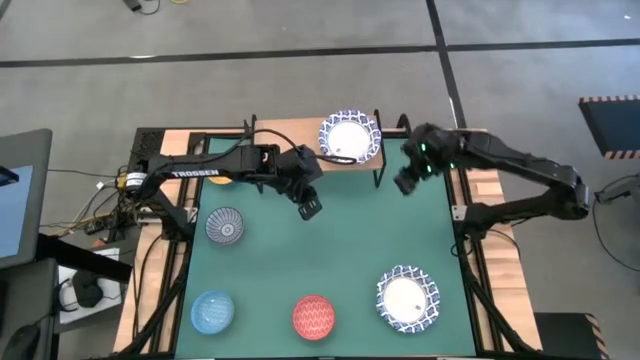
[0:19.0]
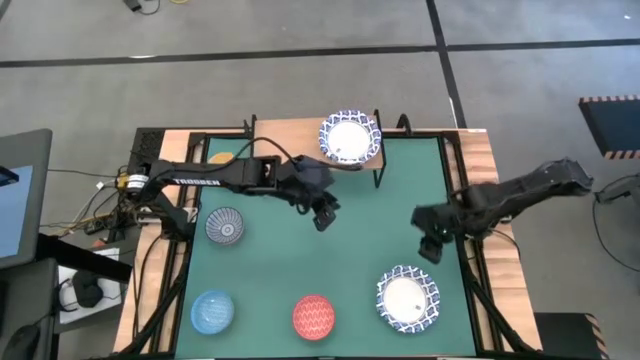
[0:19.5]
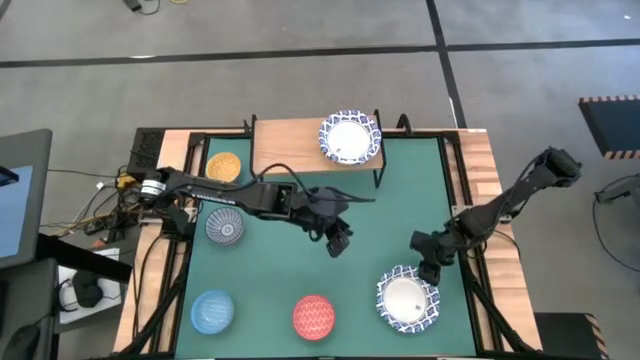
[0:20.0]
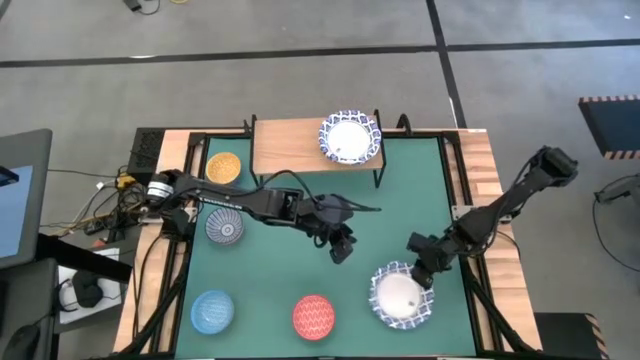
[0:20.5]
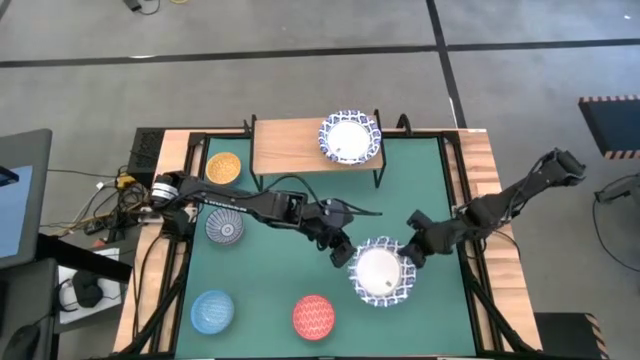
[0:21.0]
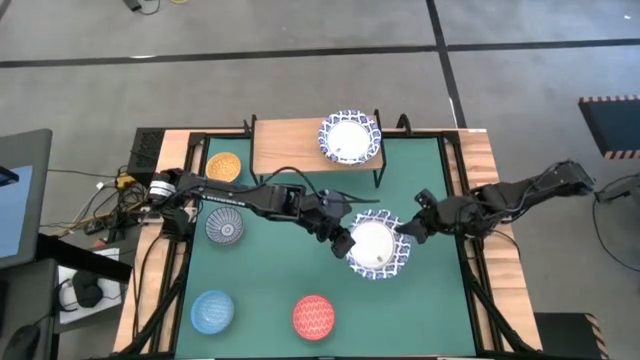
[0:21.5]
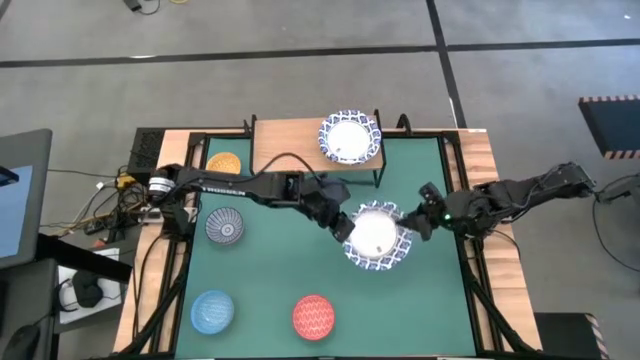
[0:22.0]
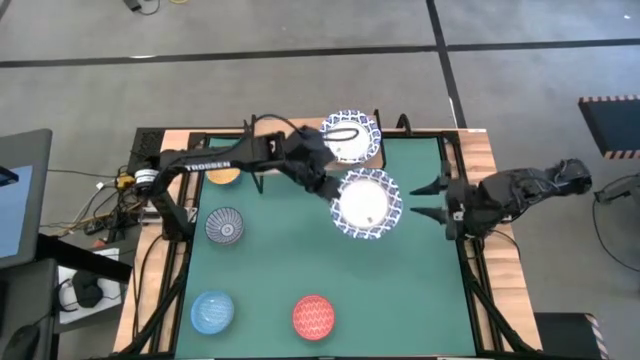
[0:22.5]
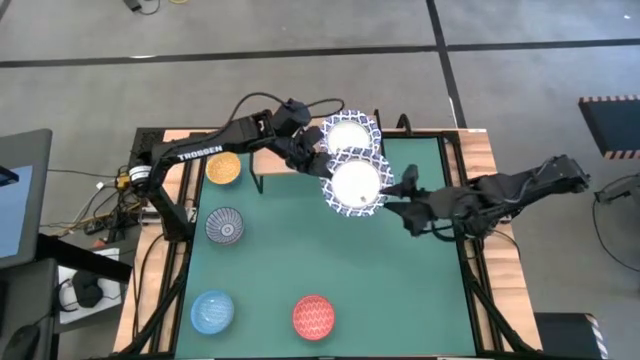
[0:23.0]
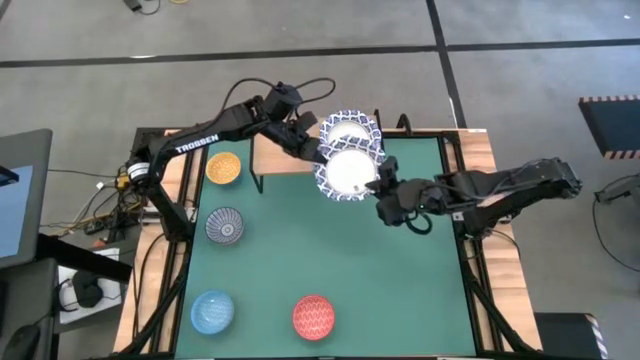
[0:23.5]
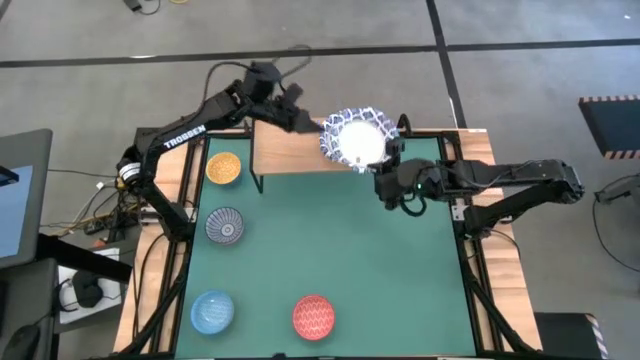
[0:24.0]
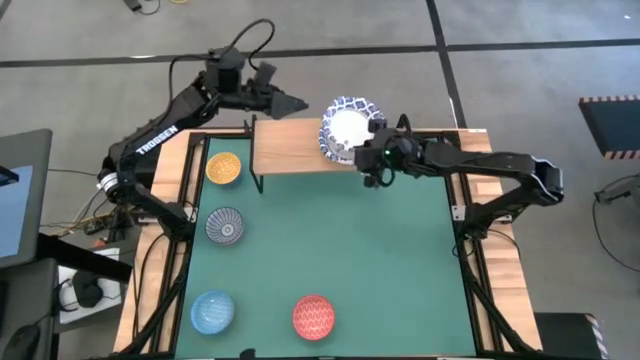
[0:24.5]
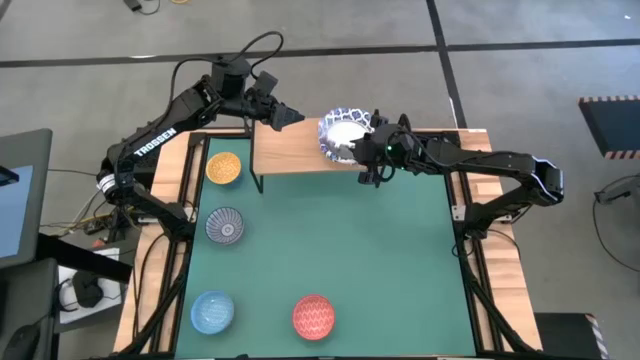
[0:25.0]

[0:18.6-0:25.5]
Task: Place and stack bowls onto a shelf
Stack the white bowl on top of the other white bowl on the shelf

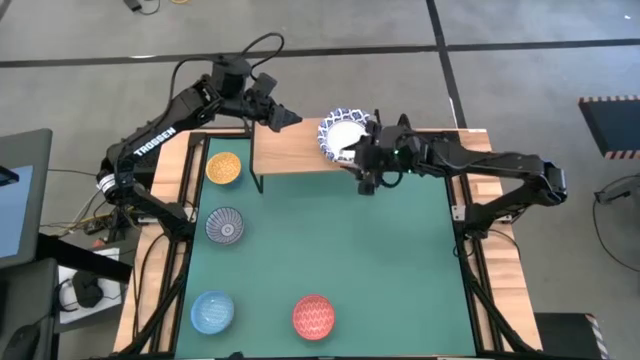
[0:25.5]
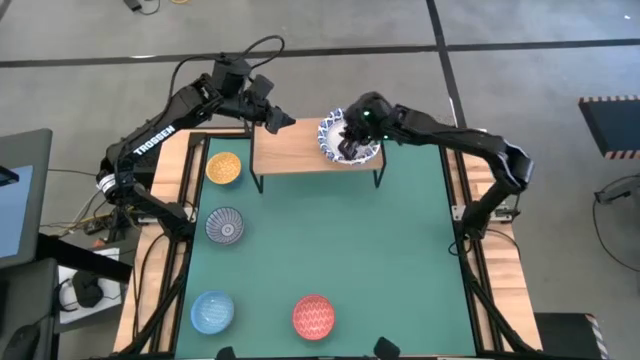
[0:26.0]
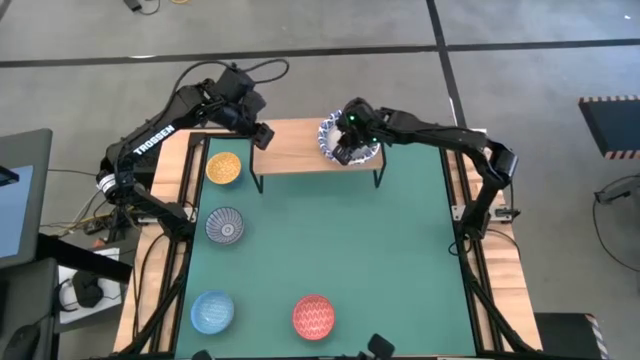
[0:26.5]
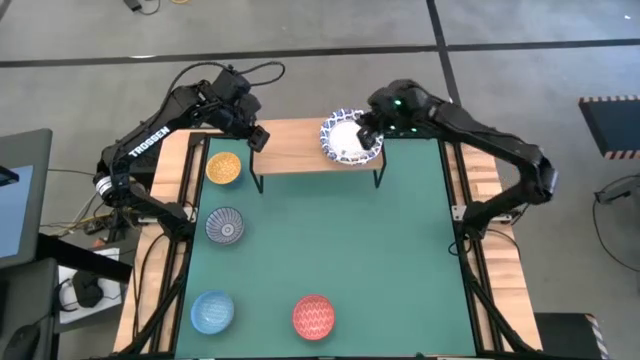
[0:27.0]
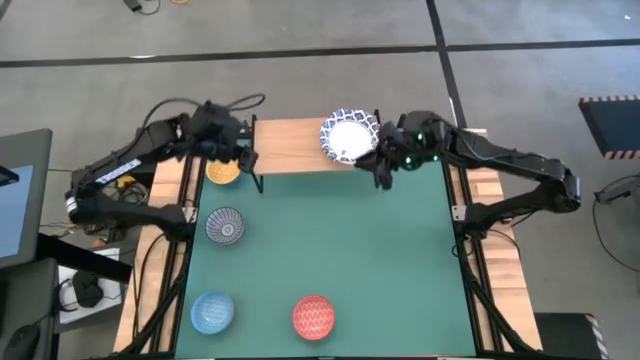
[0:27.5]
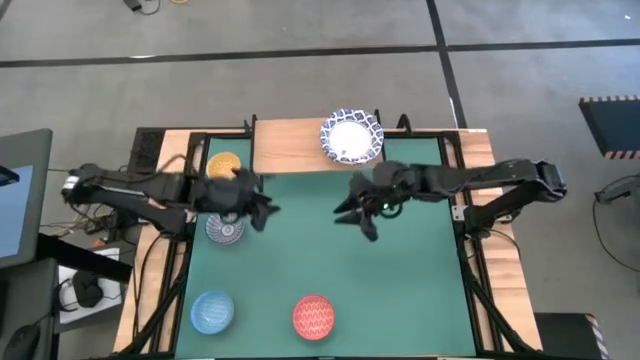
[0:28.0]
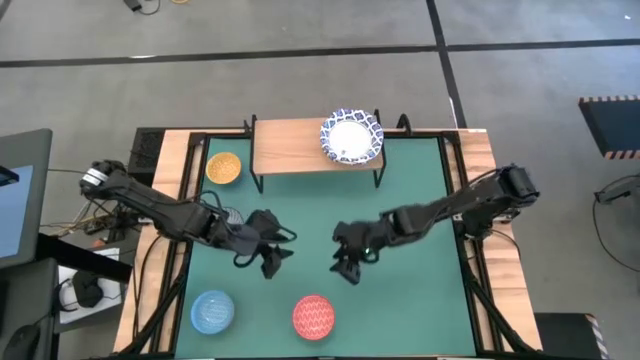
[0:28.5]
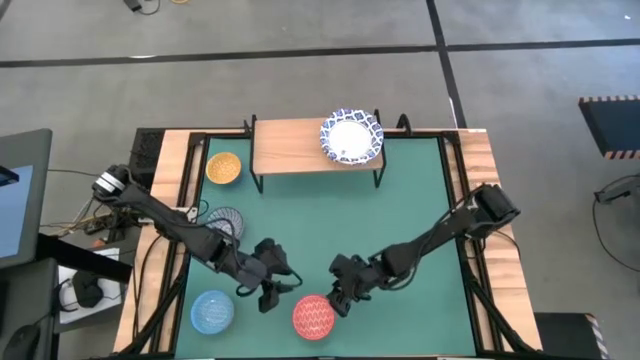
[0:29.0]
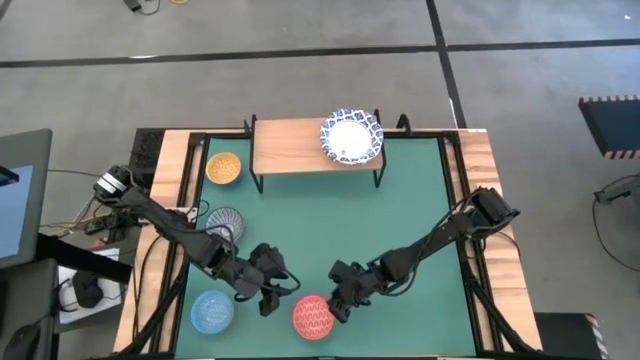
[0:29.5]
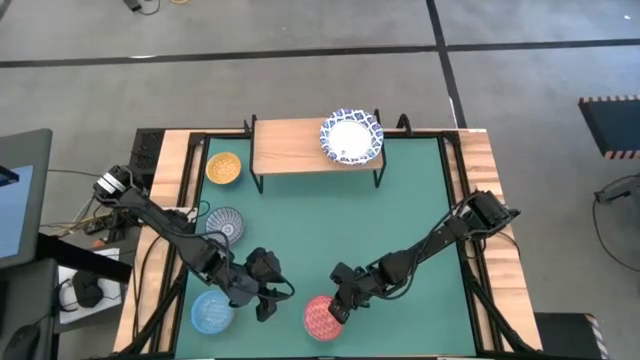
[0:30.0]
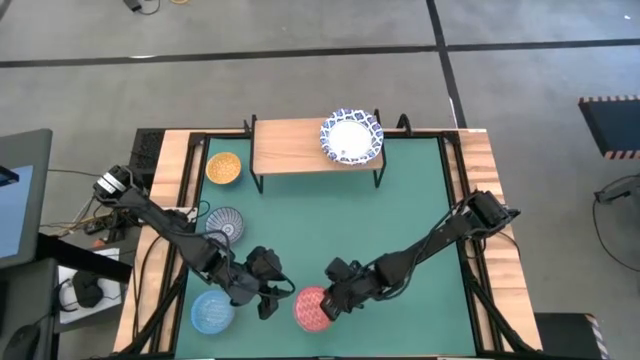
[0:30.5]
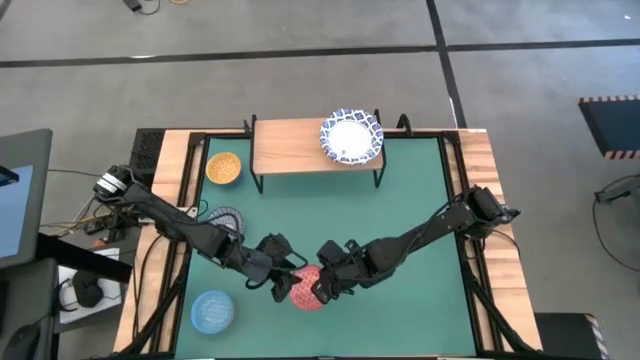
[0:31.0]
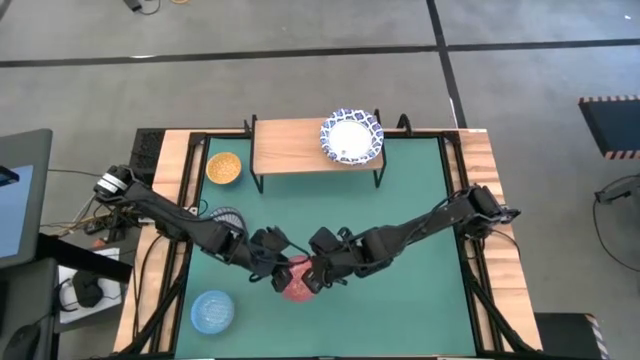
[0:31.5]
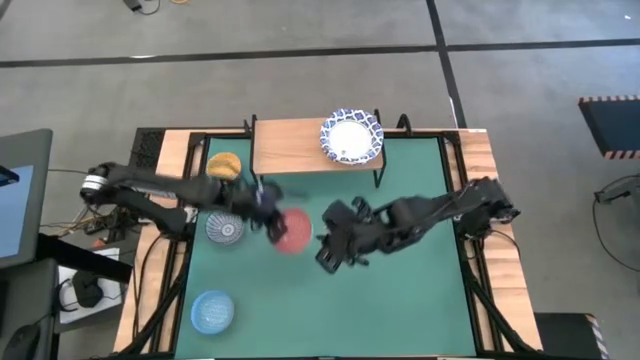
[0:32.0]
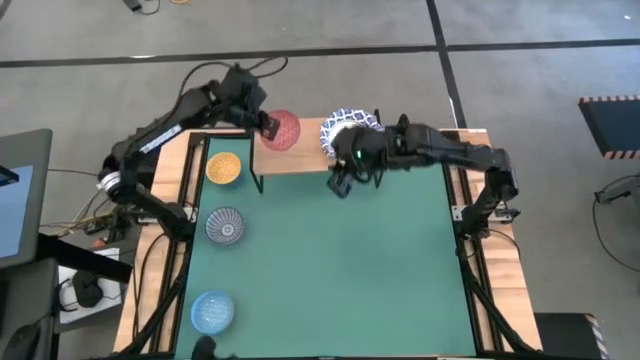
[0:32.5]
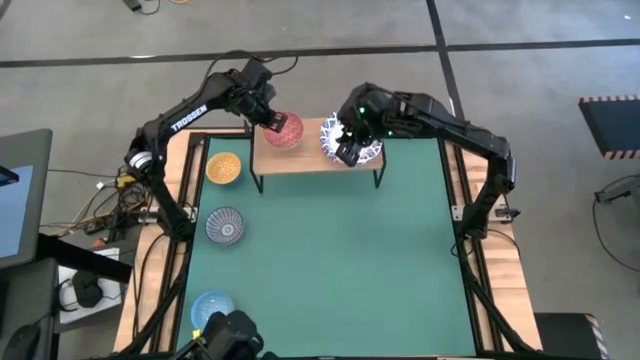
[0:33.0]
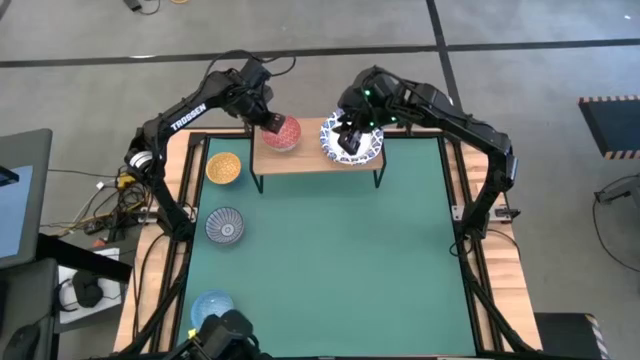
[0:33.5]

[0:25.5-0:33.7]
Put the red bowl on the shelf

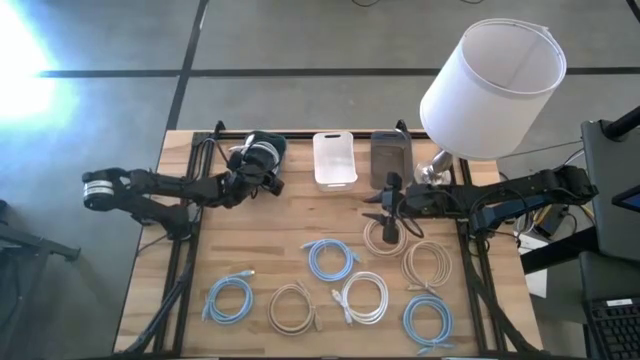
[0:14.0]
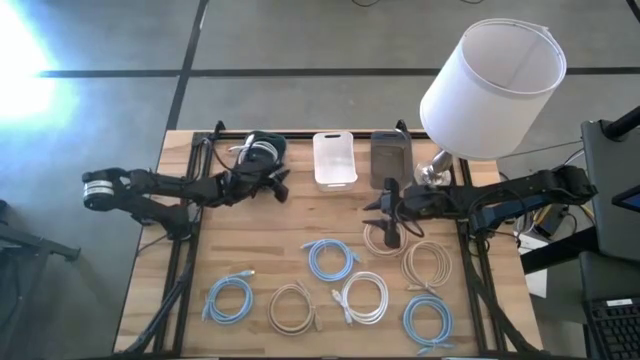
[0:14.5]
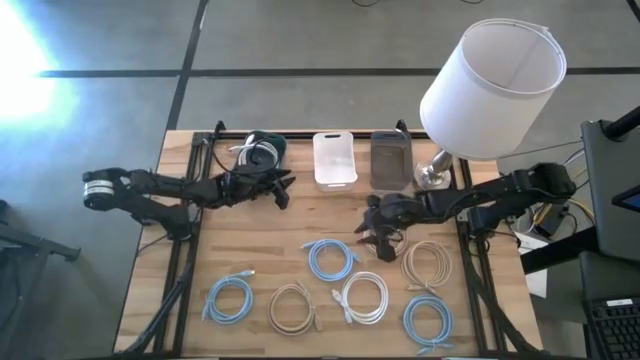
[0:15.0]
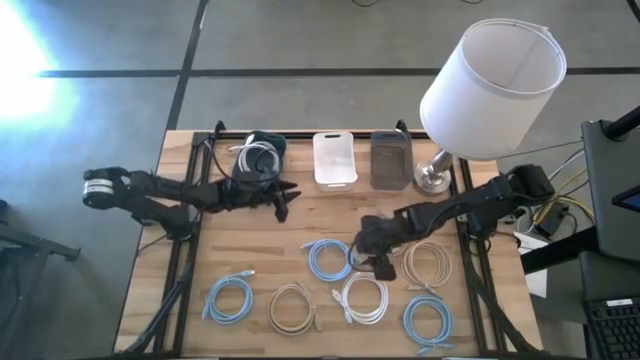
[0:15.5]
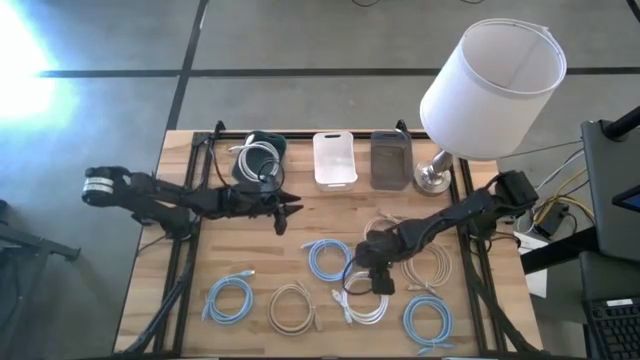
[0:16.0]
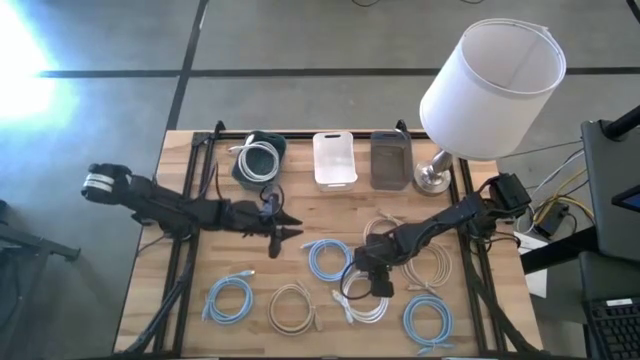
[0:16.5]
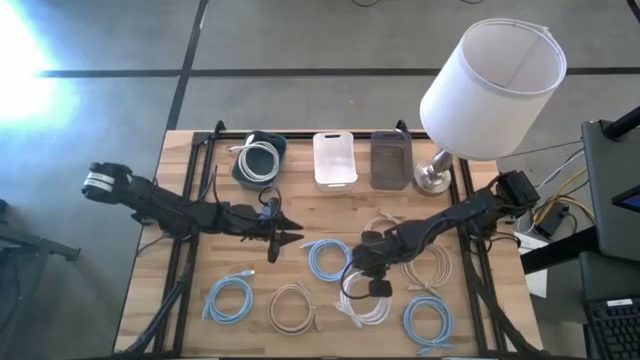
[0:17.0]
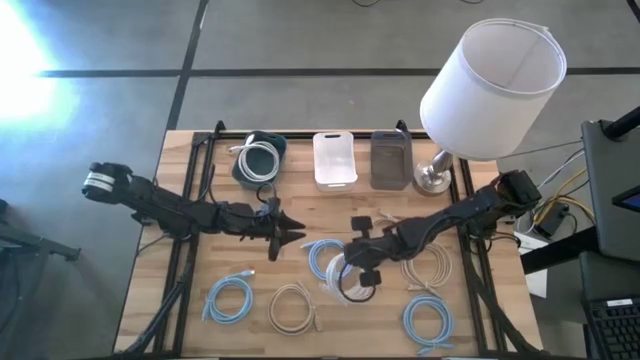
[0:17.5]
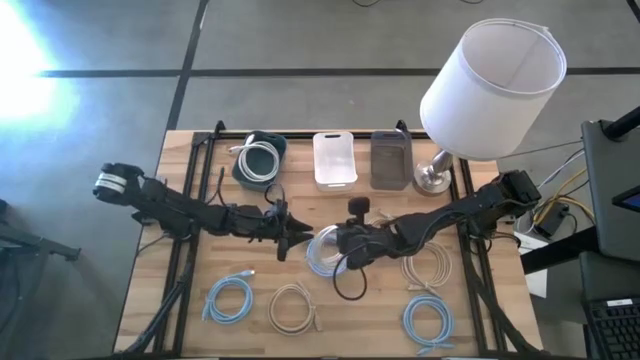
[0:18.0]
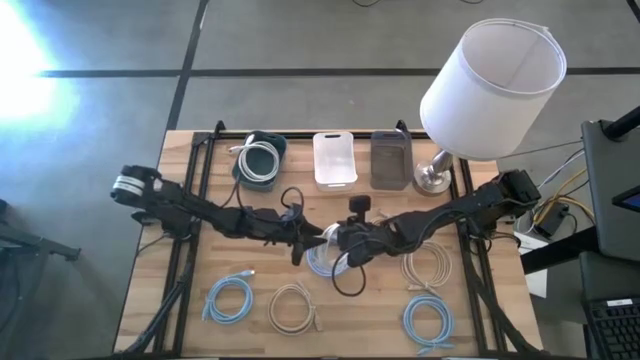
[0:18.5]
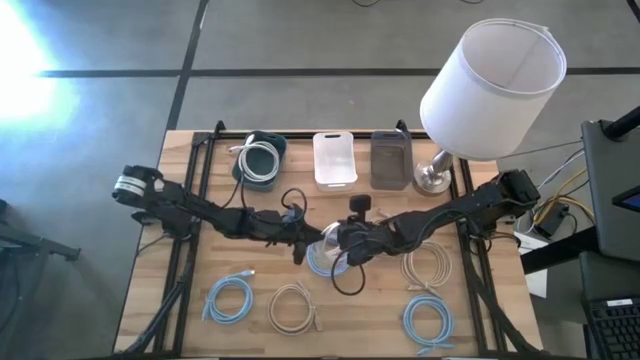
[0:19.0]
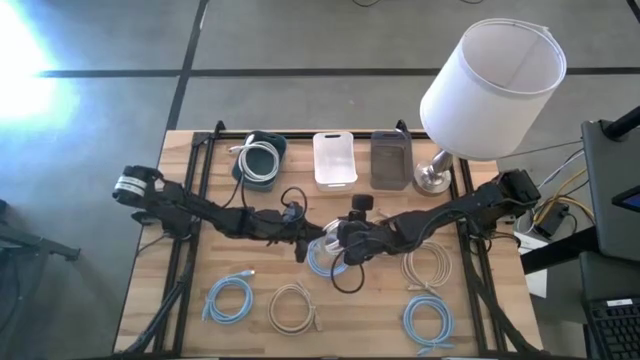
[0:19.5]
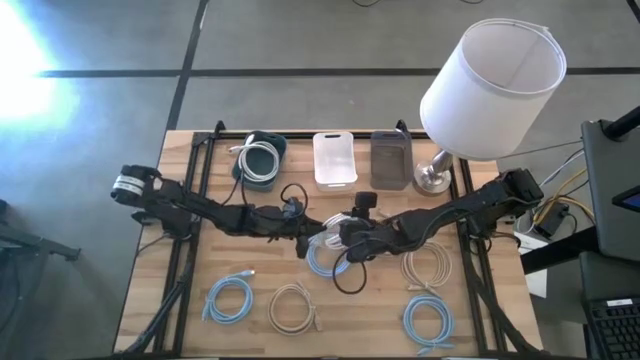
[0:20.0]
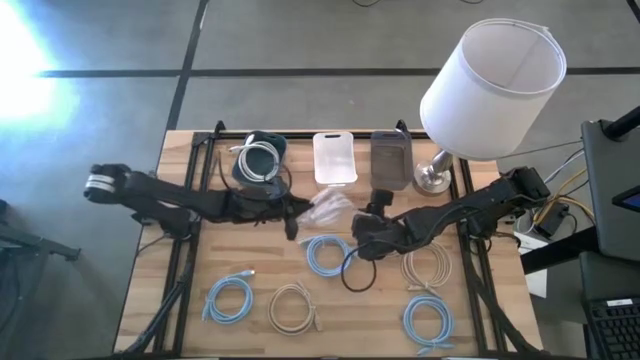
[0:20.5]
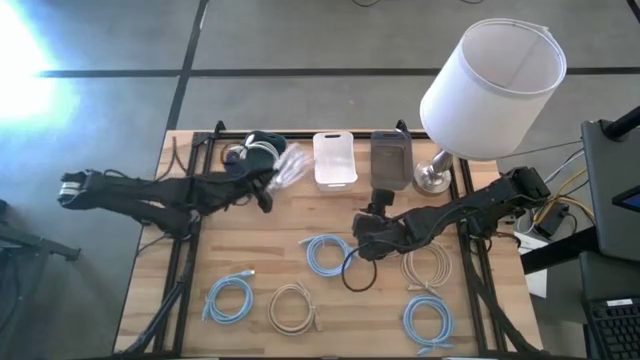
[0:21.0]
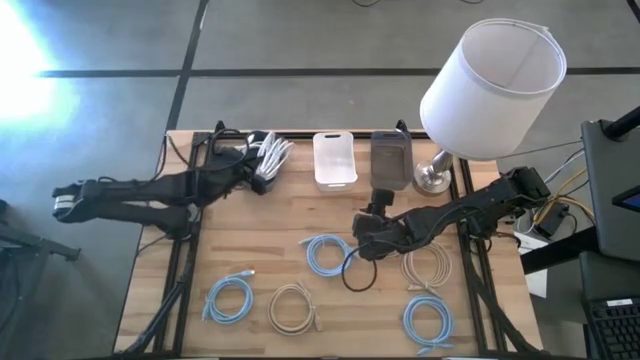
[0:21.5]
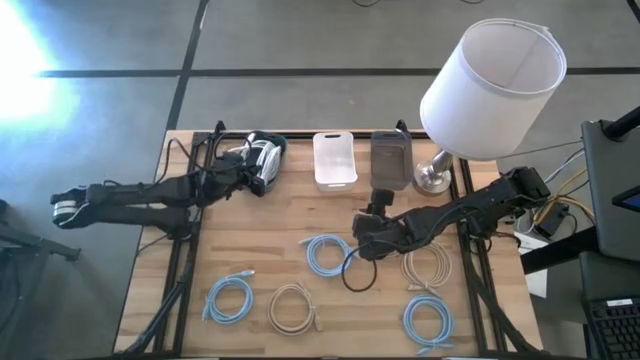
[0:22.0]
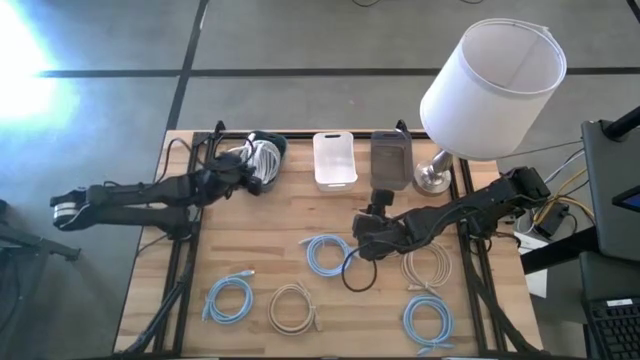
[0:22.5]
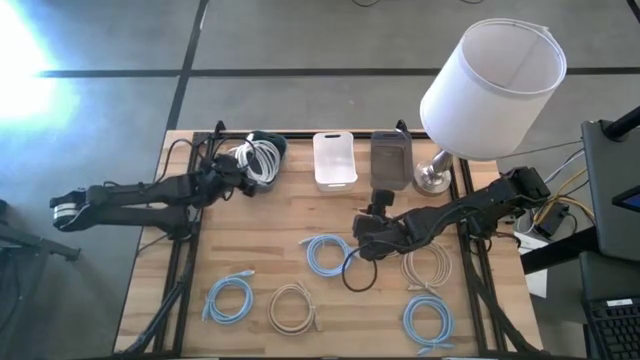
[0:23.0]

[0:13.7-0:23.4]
Task: Sort HDMI cables
Put the white HDMI cable into the blue bin
